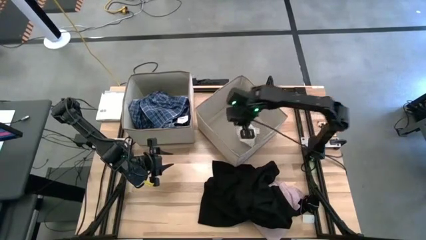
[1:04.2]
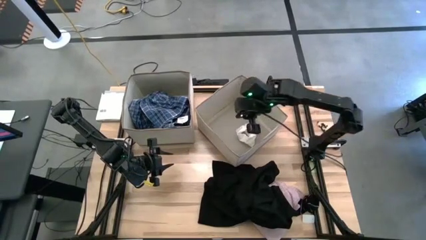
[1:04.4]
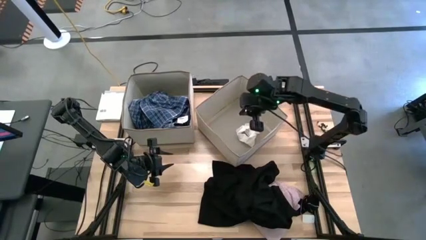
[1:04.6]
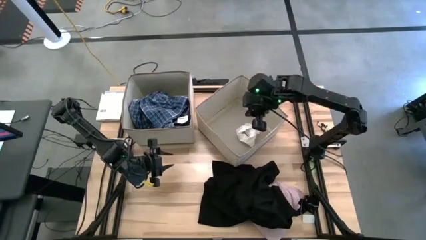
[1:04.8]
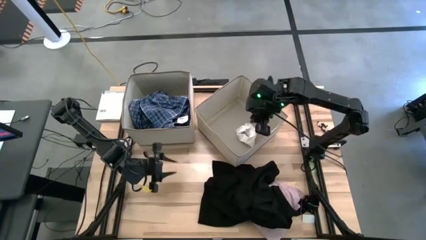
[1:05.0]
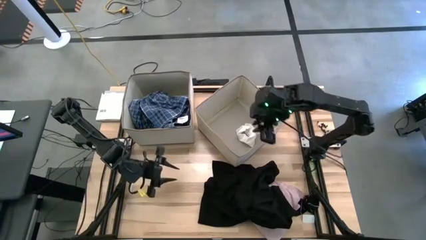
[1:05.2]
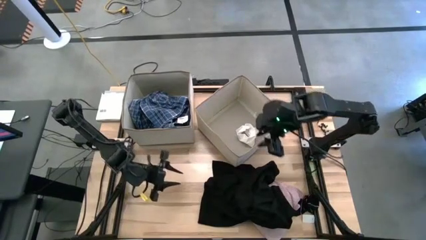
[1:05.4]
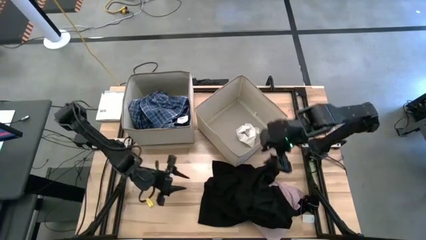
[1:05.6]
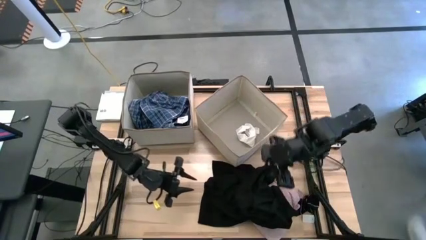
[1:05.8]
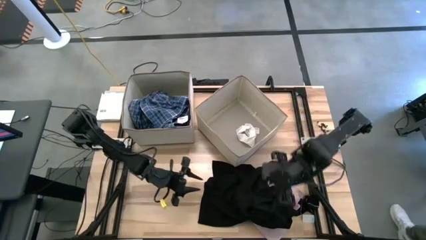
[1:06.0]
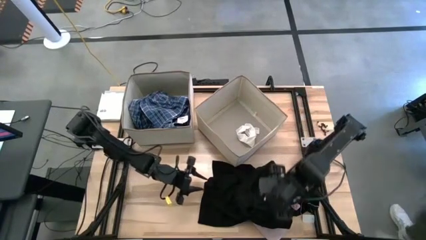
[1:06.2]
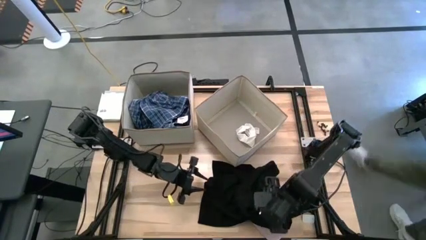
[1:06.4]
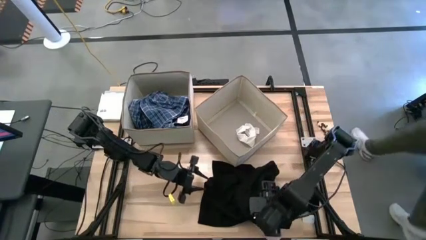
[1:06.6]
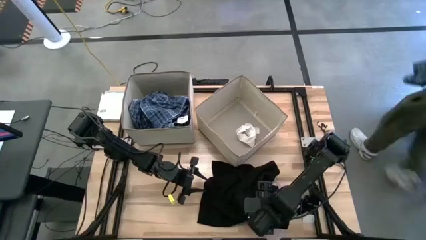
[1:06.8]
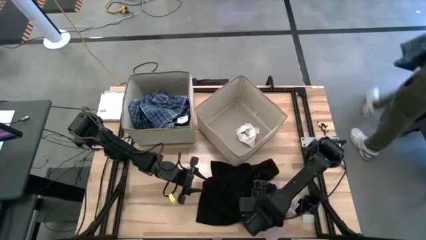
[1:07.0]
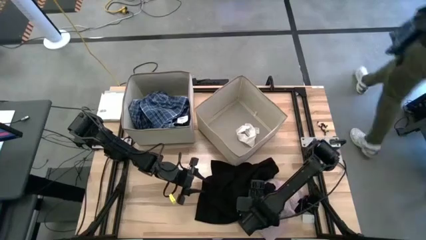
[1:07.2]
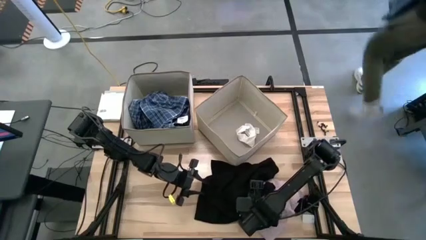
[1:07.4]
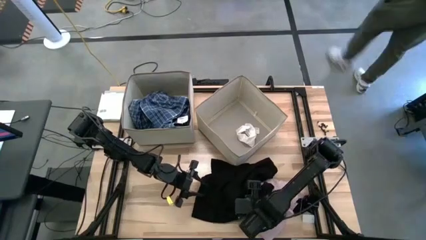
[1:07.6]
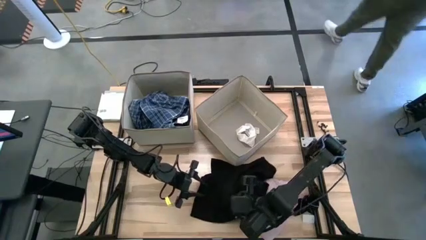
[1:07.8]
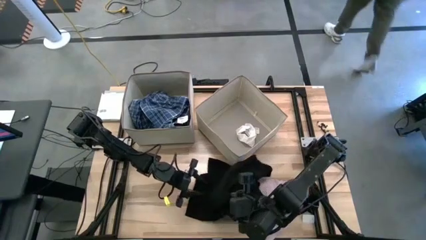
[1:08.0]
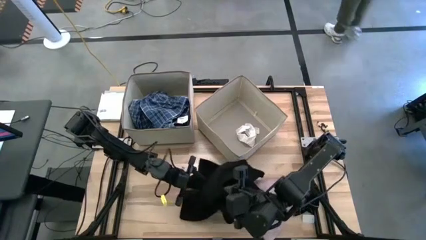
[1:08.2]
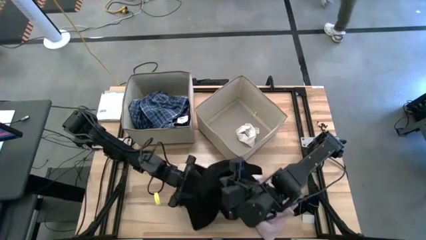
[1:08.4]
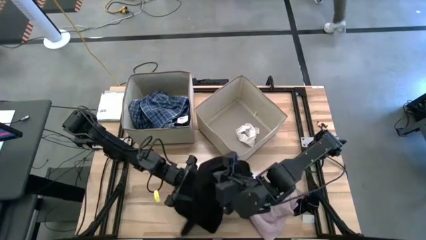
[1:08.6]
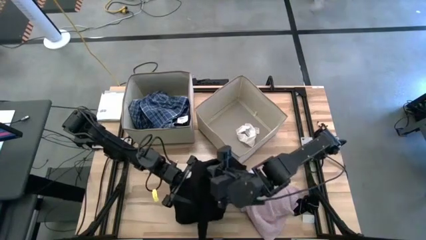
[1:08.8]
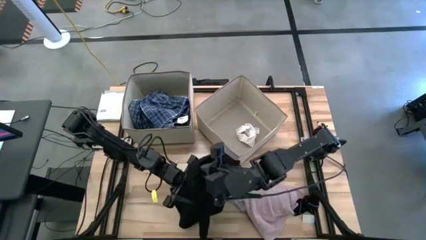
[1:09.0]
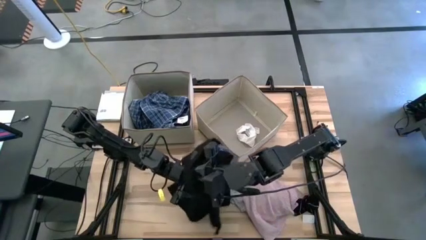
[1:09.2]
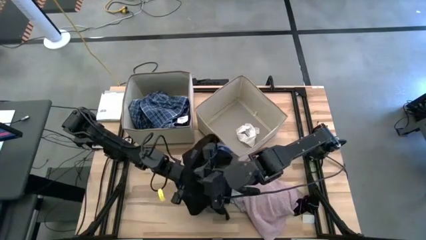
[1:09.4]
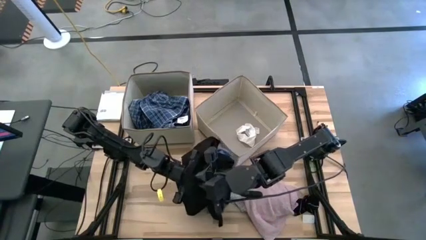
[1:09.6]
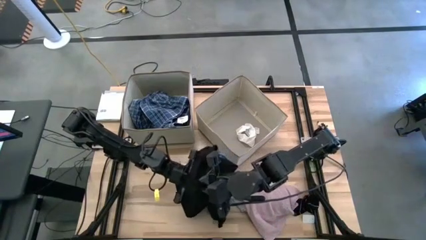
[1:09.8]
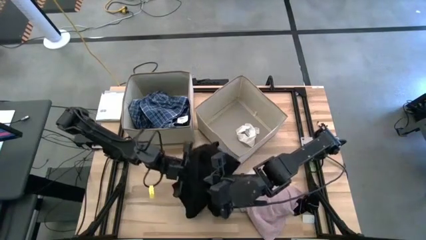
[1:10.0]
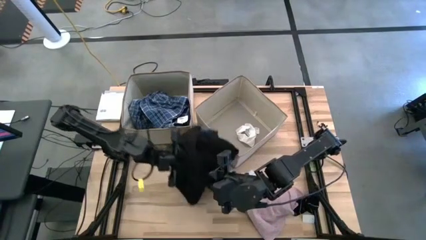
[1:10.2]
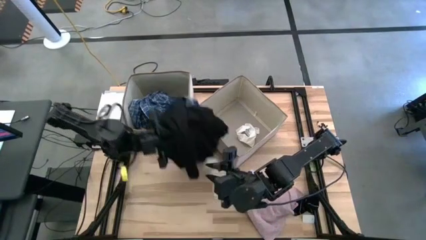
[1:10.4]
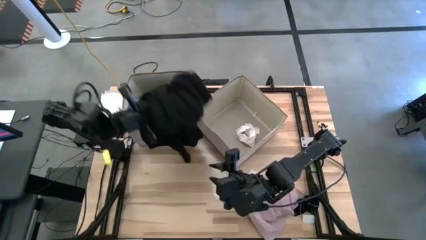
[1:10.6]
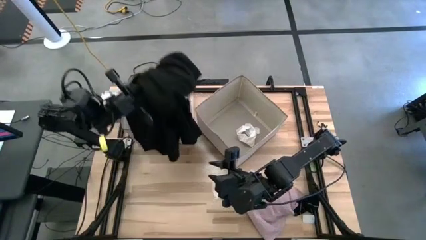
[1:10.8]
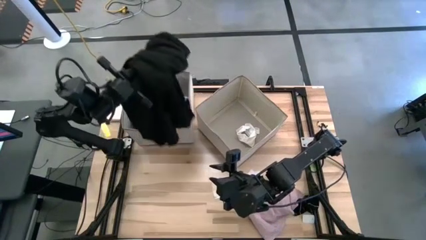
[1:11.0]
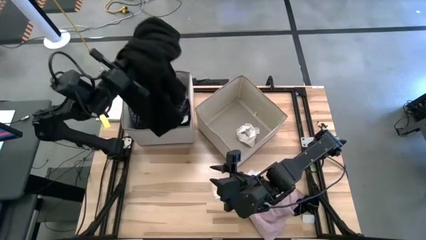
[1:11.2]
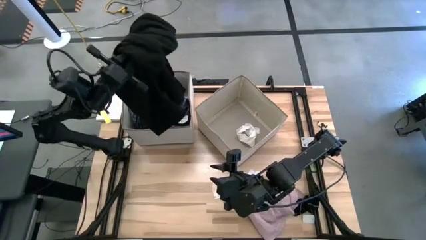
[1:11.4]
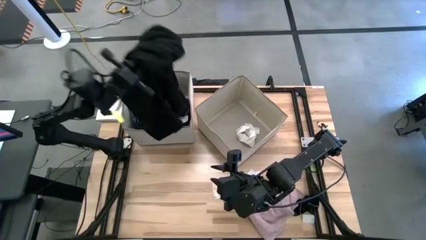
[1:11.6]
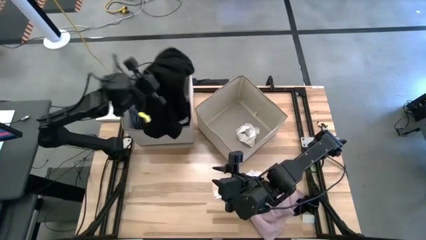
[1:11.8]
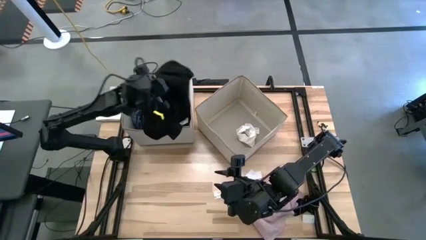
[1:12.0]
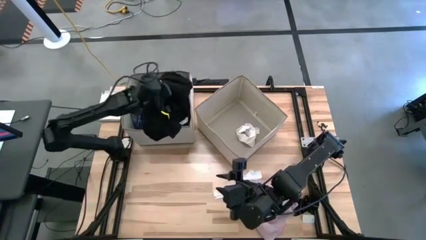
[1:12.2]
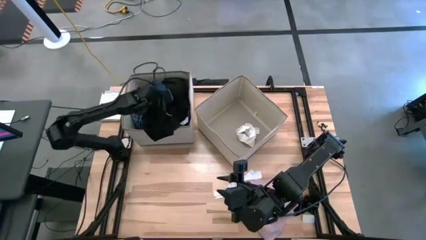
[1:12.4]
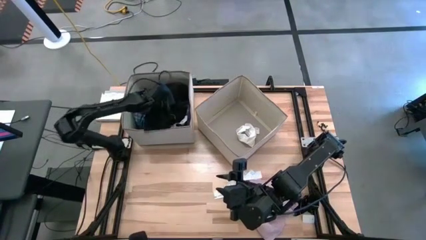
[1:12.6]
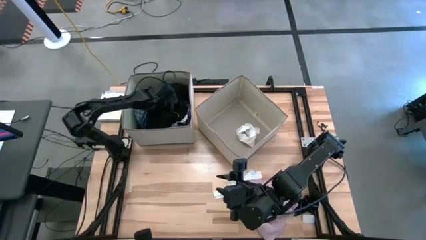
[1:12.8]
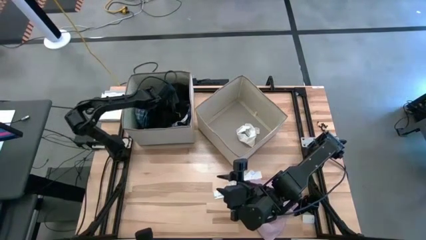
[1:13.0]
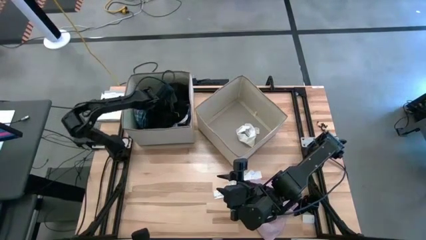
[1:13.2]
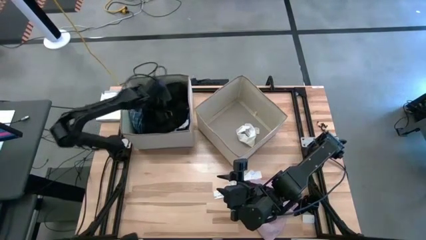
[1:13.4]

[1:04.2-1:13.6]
Task: Sort clothes
Put the black shirt into the left laundry organizer

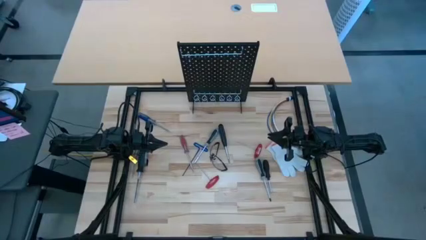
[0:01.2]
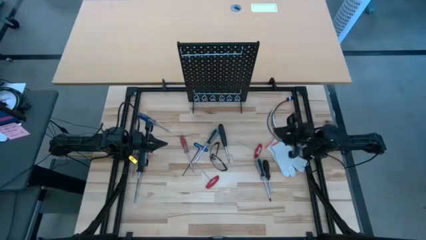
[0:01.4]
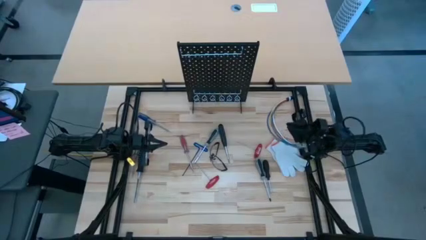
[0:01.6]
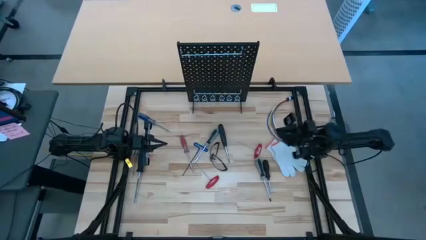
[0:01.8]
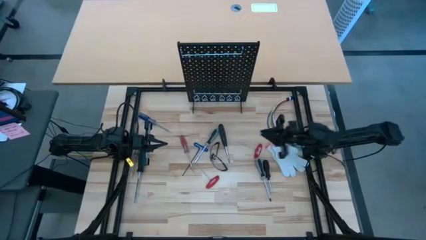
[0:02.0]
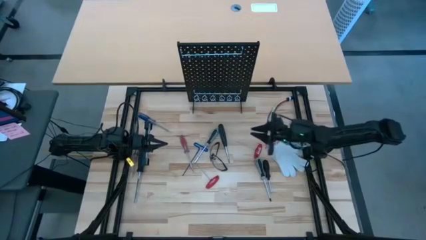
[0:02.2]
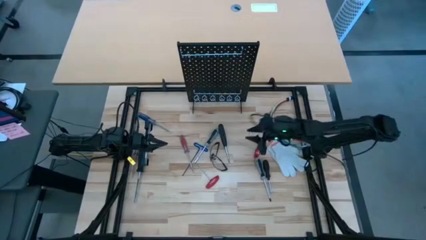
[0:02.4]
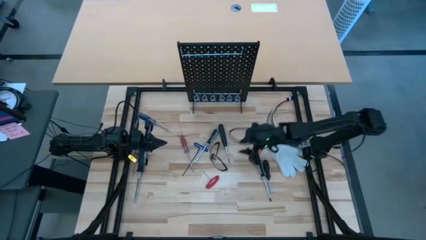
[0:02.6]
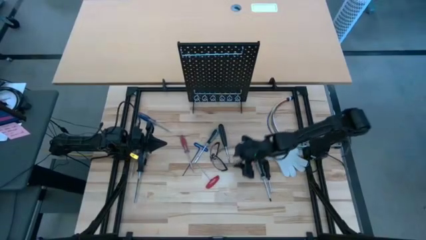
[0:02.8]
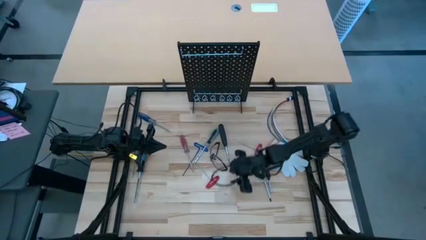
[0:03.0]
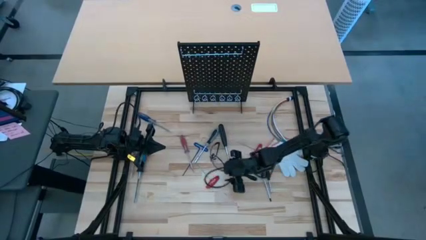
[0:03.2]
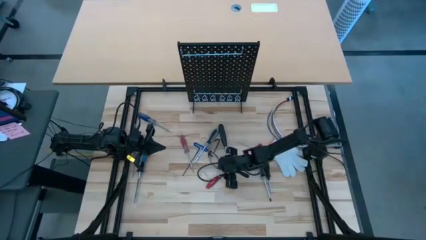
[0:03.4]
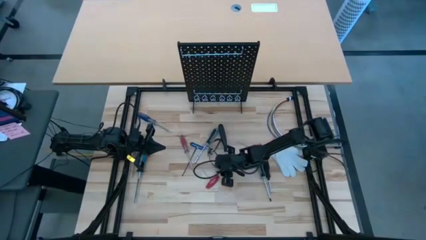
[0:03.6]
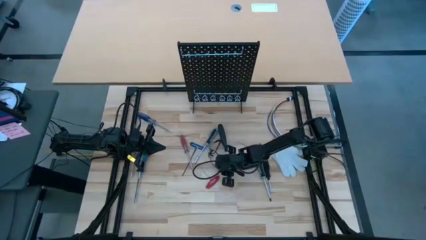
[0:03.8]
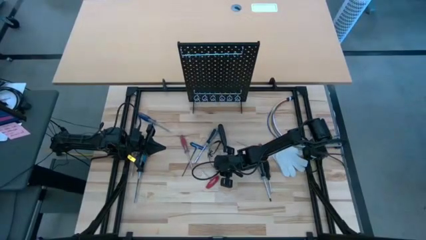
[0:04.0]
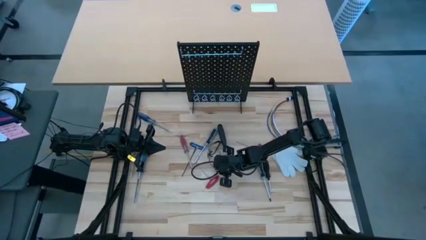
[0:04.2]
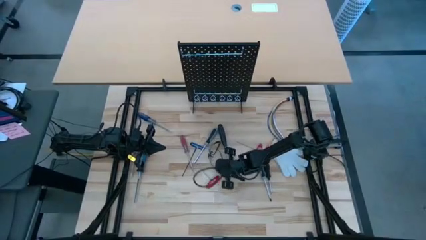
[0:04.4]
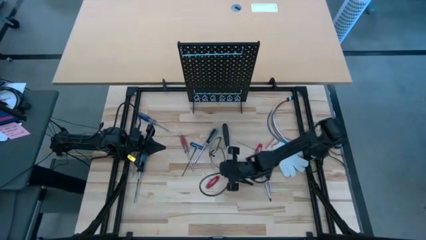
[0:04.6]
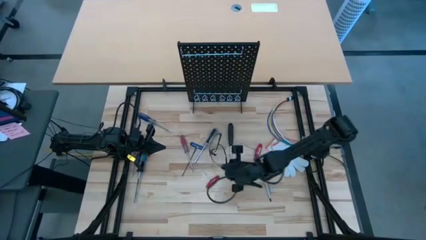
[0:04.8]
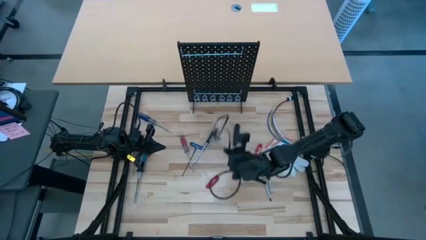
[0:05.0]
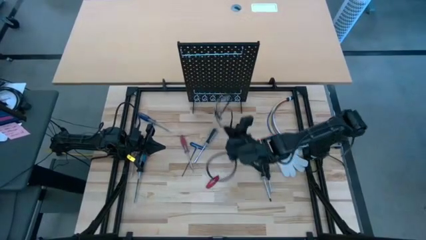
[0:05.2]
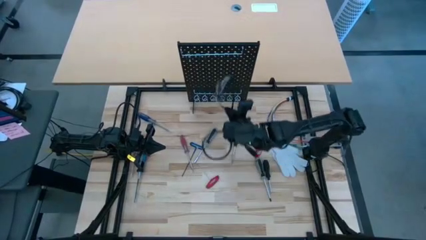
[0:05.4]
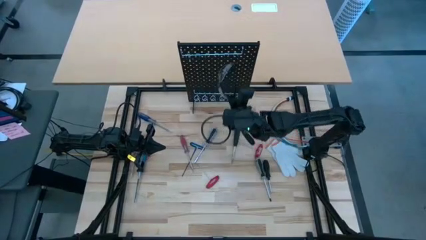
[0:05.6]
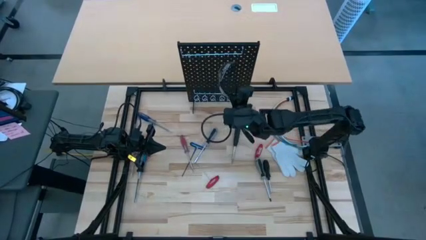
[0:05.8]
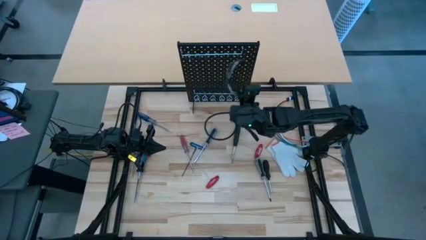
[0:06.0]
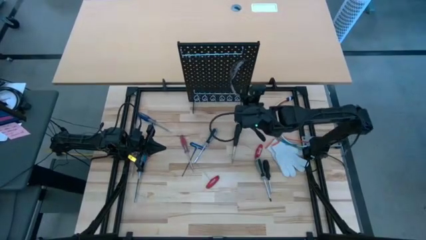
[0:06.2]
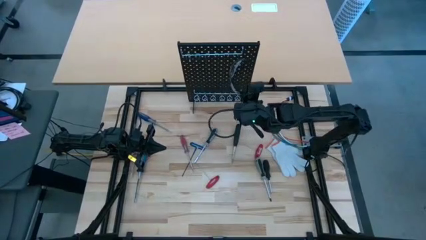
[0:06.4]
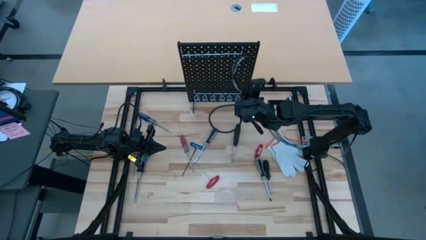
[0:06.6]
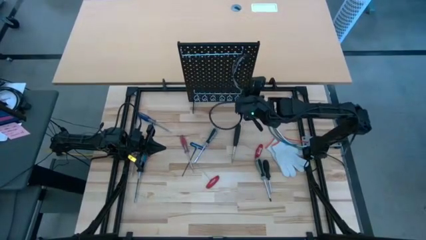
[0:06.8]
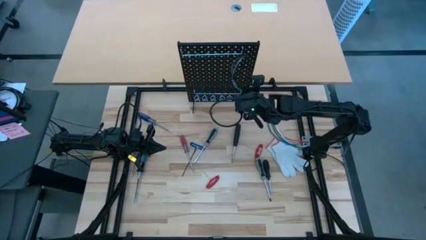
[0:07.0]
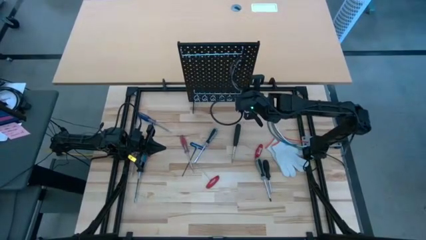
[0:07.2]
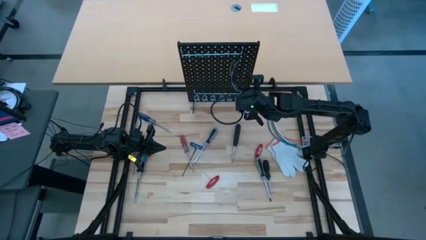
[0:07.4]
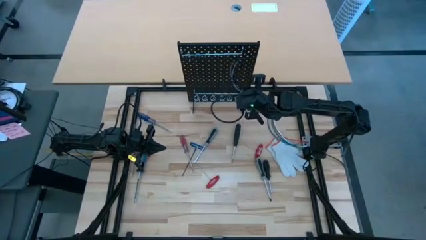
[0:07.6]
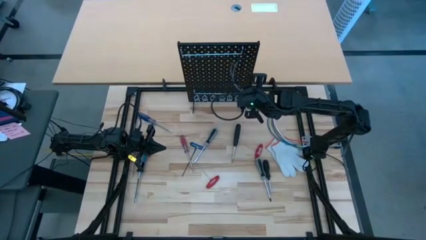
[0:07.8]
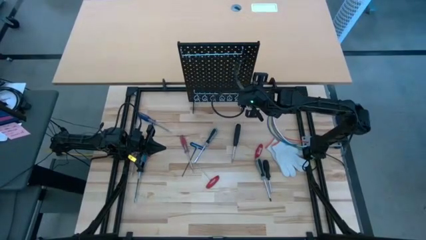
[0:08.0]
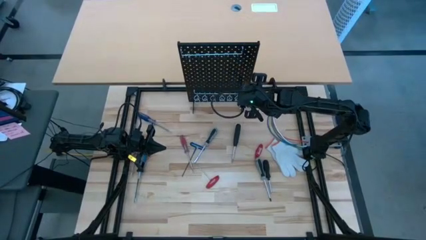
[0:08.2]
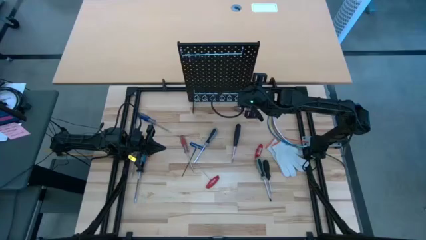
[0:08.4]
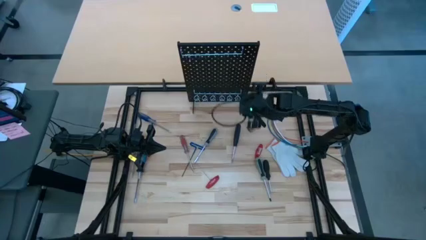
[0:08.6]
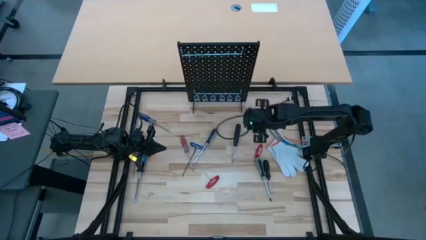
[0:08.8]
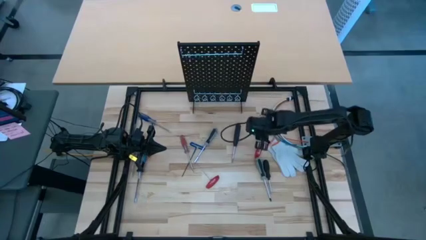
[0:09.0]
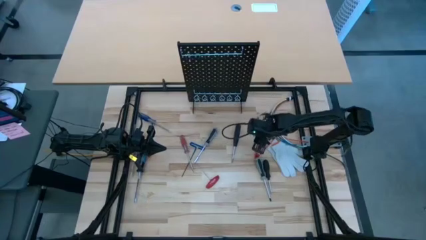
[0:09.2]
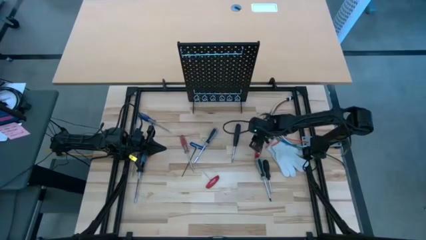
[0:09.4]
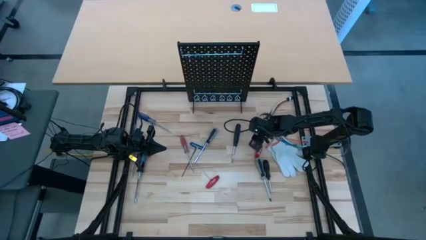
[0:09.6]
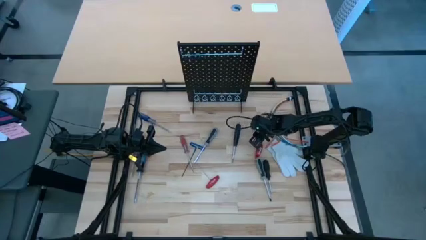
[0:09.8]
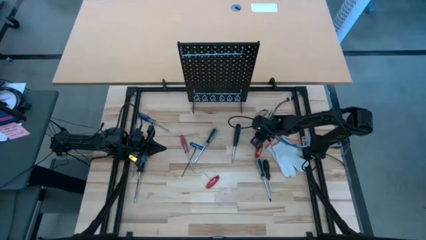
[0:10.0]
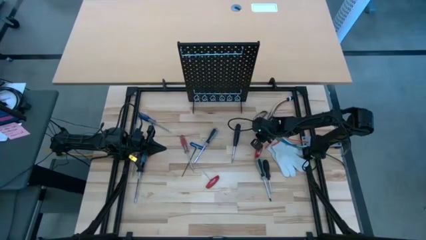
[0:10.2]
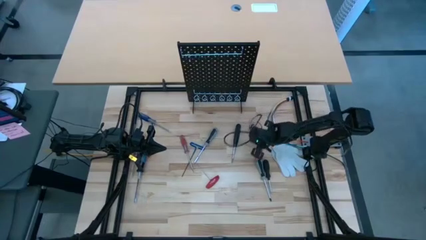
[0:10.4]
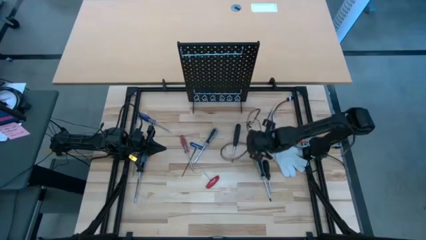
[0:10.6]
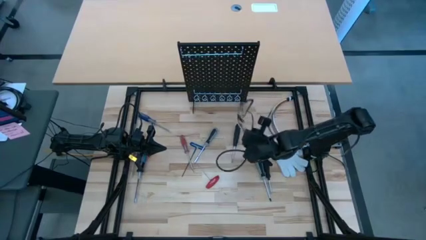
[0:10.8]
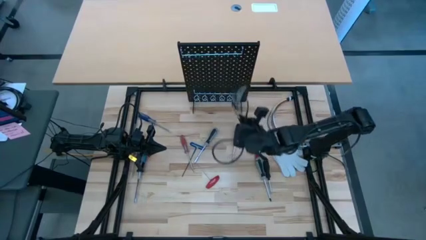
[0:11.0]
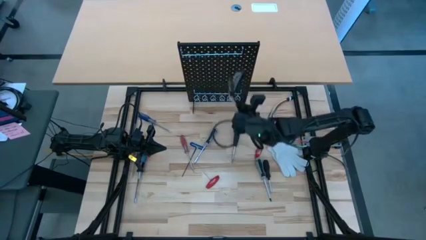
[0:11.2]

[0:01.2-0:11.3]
Task: Hang tools onto peg board
Hang the clear safety goggles on the pegboard
